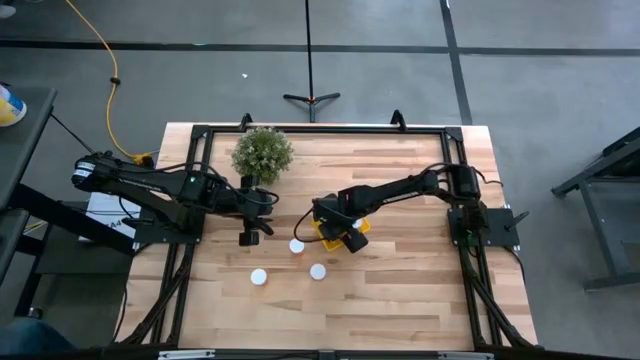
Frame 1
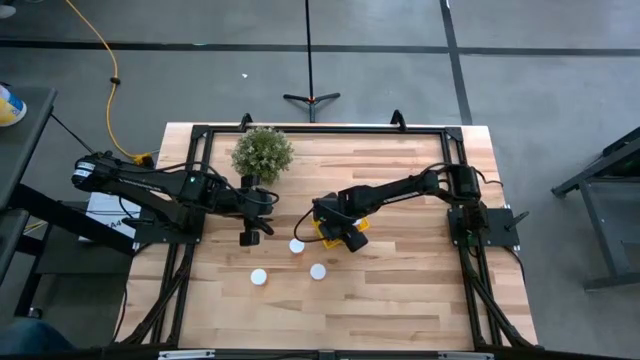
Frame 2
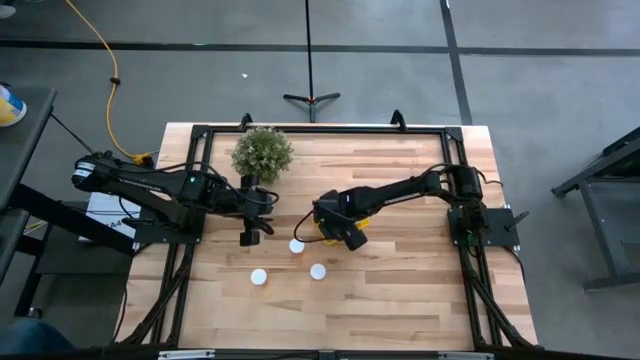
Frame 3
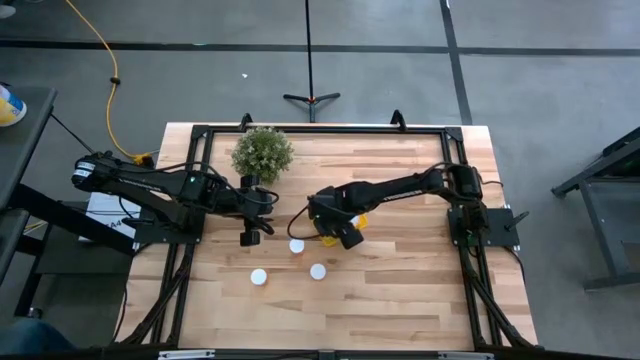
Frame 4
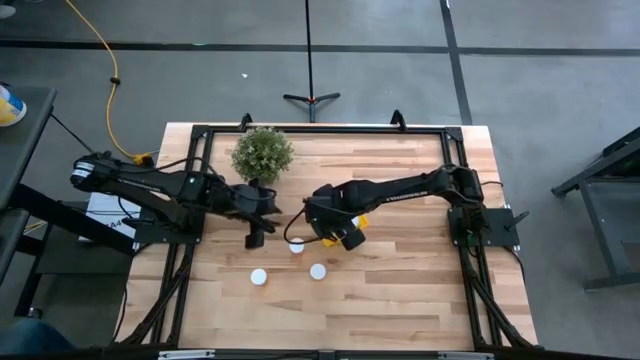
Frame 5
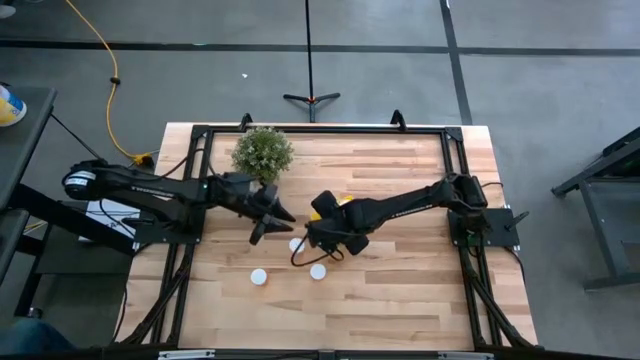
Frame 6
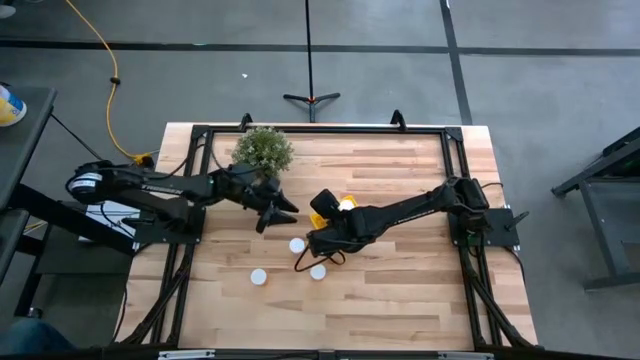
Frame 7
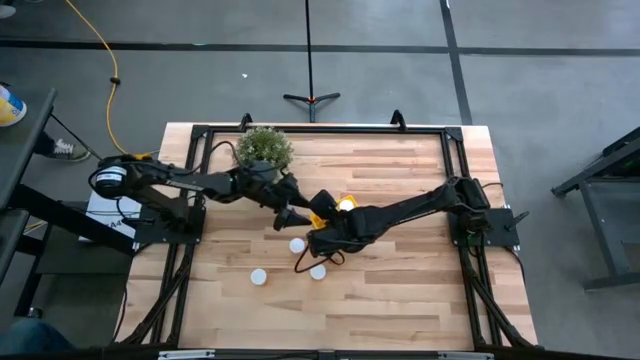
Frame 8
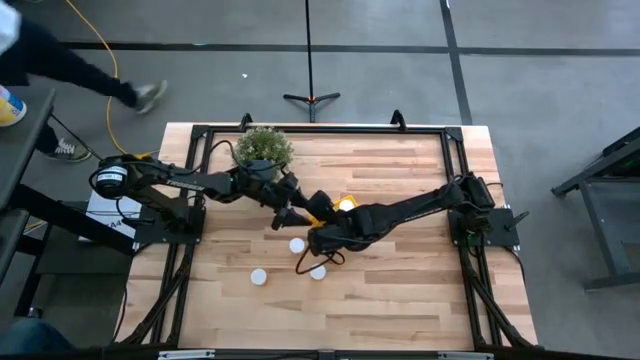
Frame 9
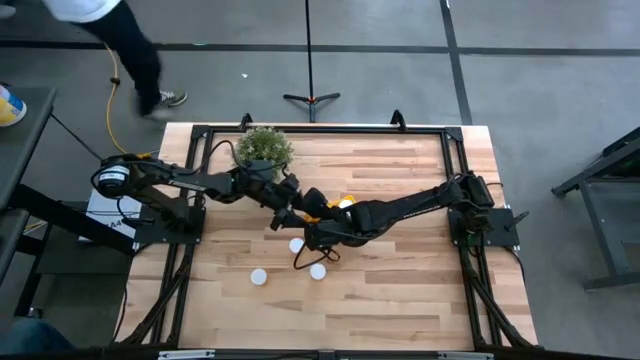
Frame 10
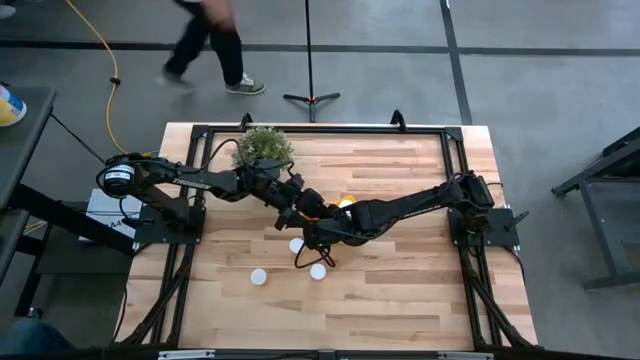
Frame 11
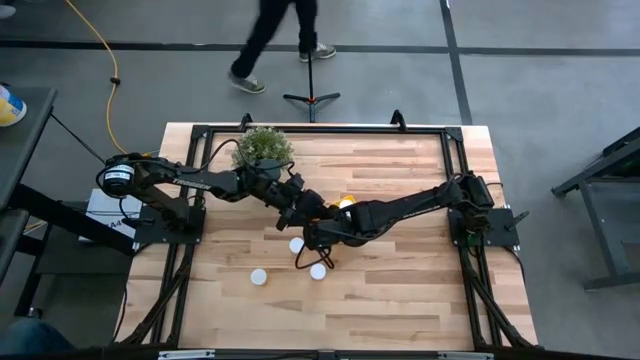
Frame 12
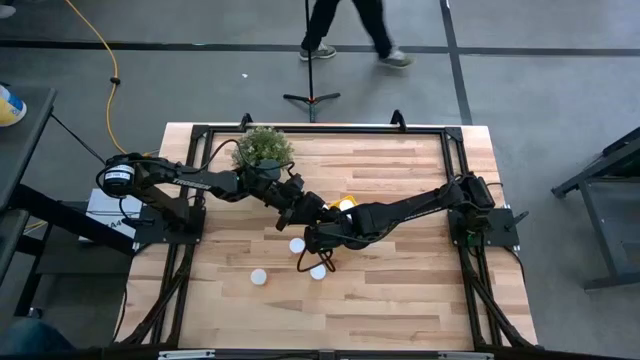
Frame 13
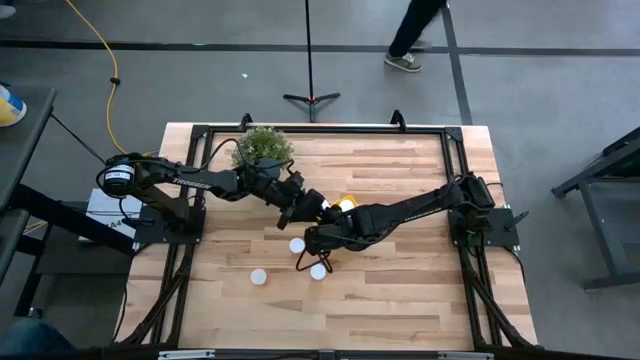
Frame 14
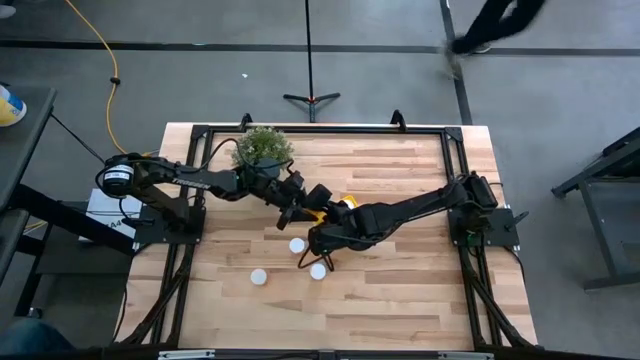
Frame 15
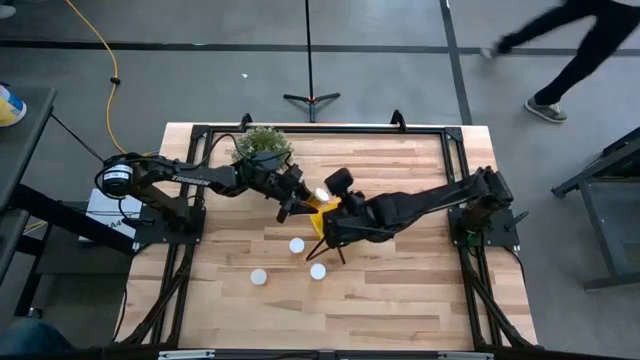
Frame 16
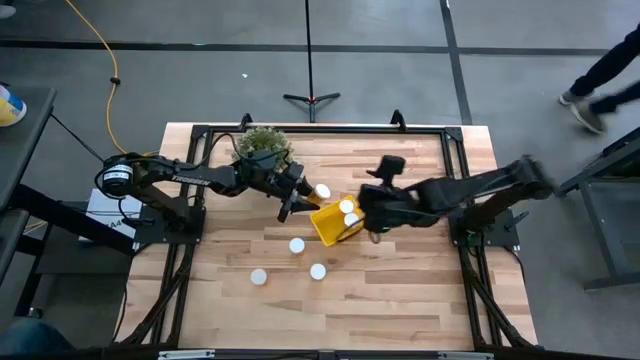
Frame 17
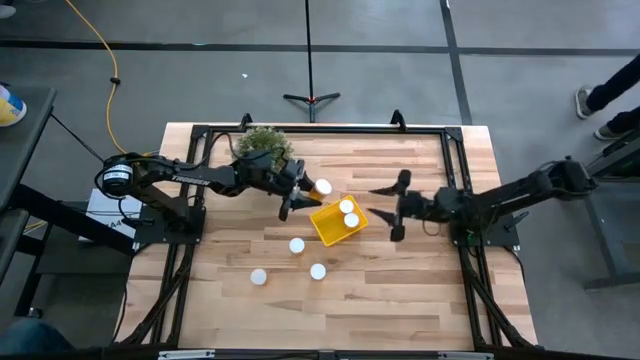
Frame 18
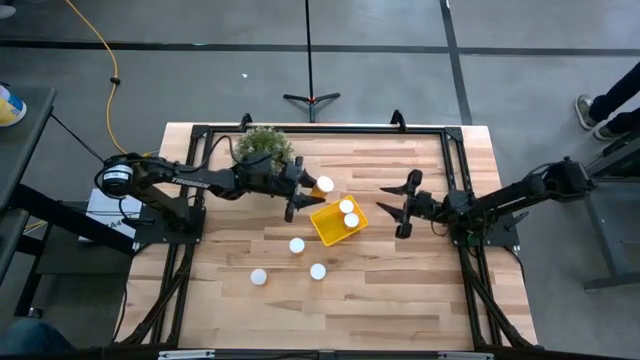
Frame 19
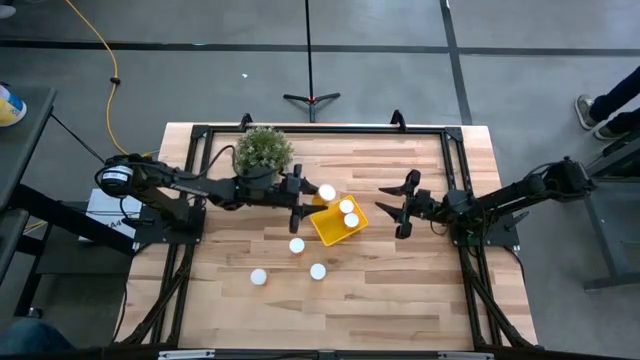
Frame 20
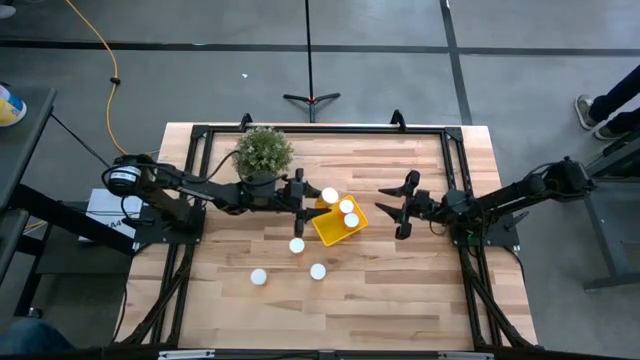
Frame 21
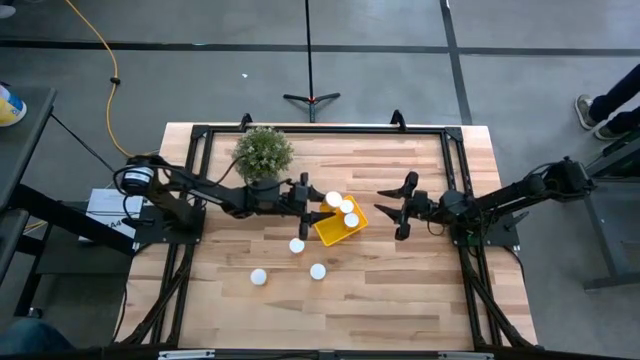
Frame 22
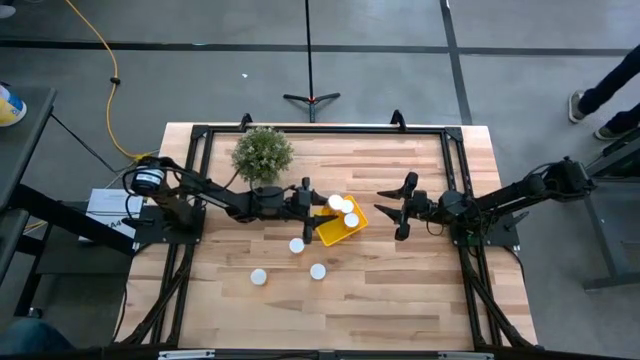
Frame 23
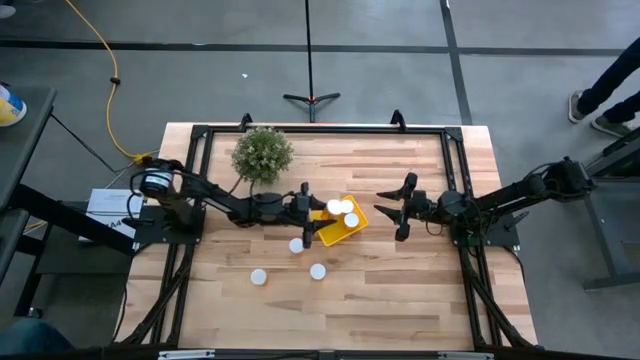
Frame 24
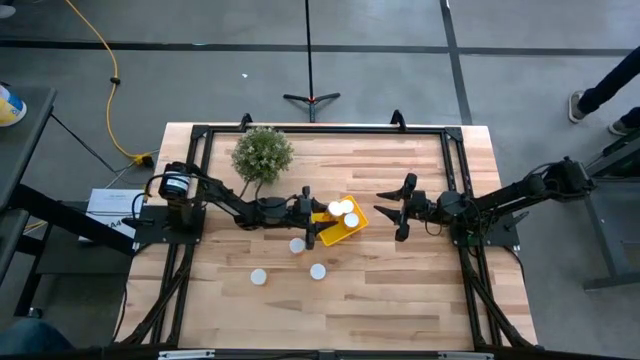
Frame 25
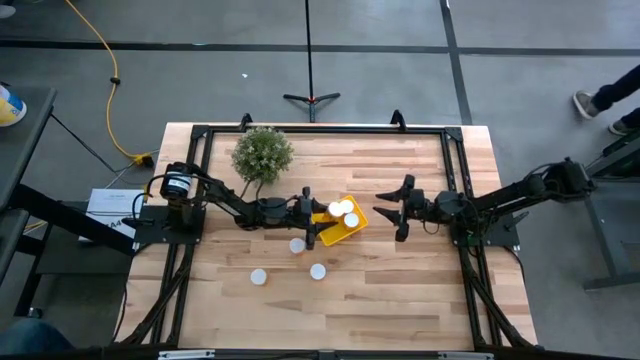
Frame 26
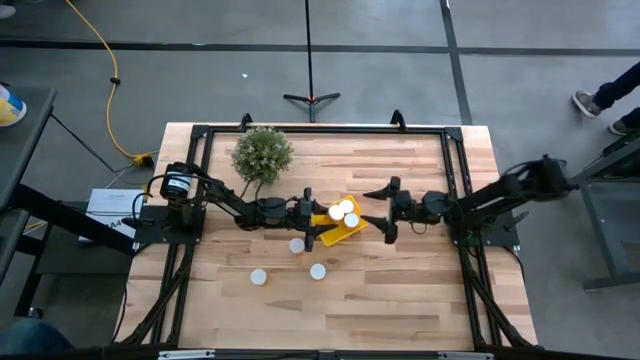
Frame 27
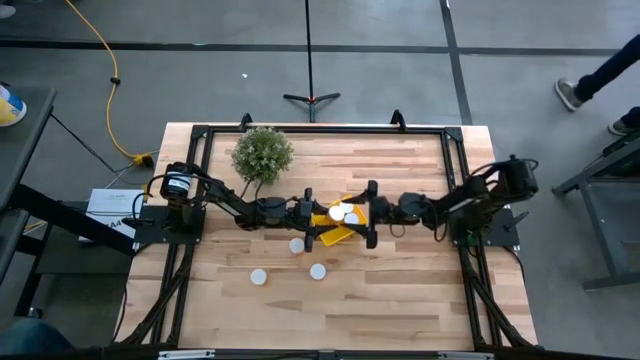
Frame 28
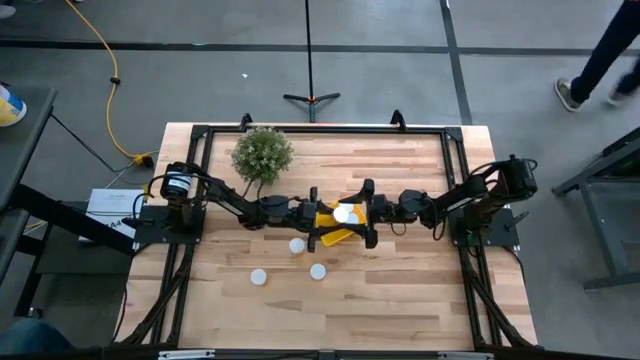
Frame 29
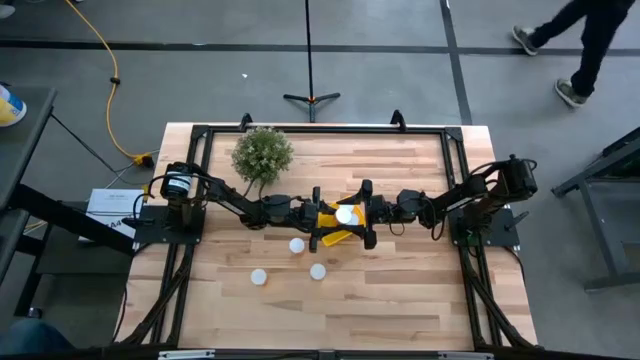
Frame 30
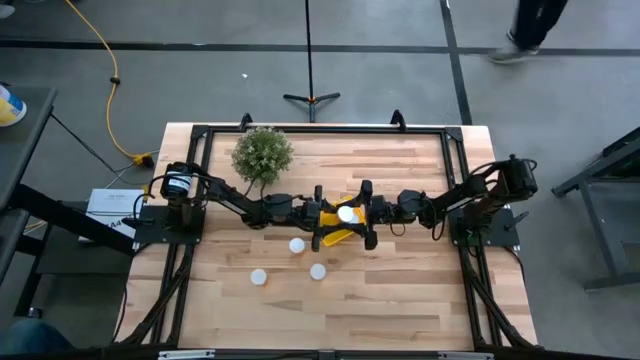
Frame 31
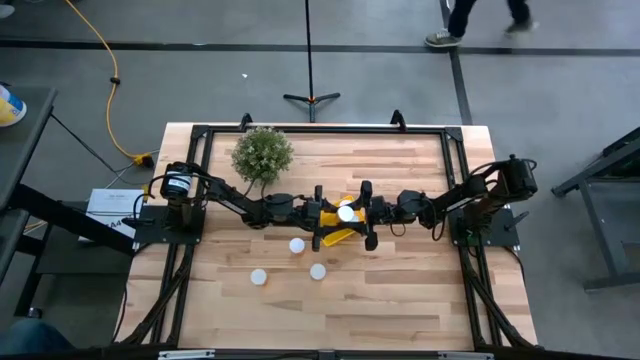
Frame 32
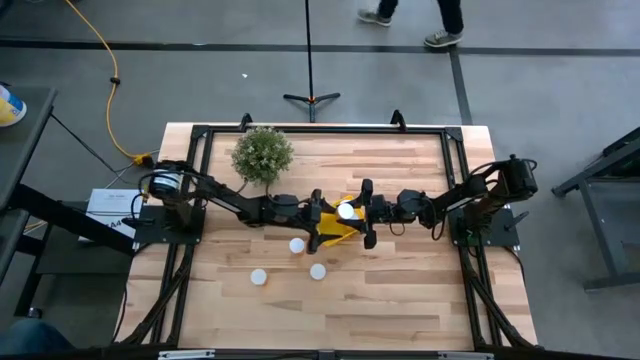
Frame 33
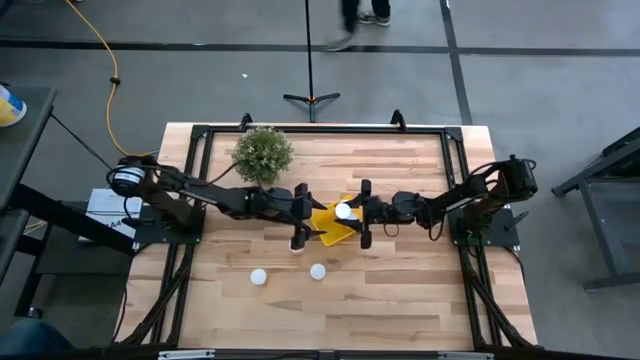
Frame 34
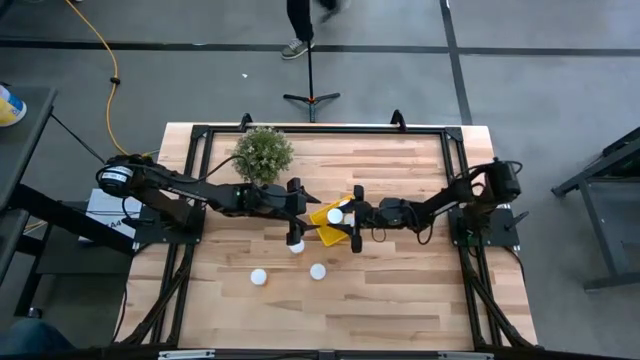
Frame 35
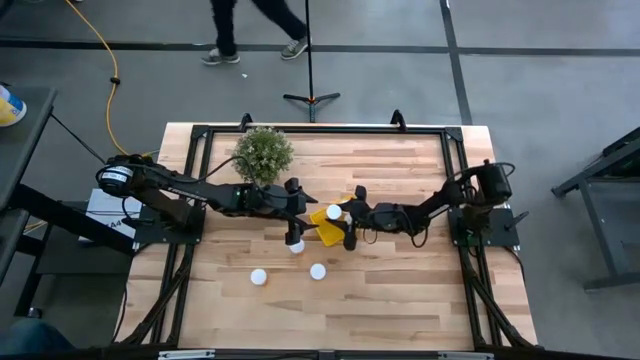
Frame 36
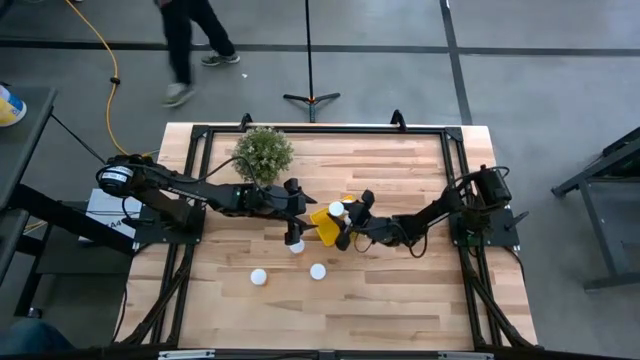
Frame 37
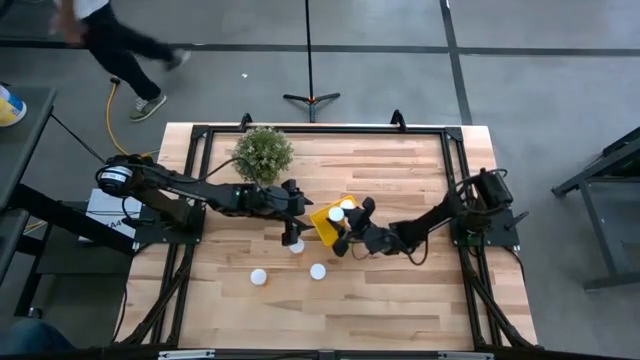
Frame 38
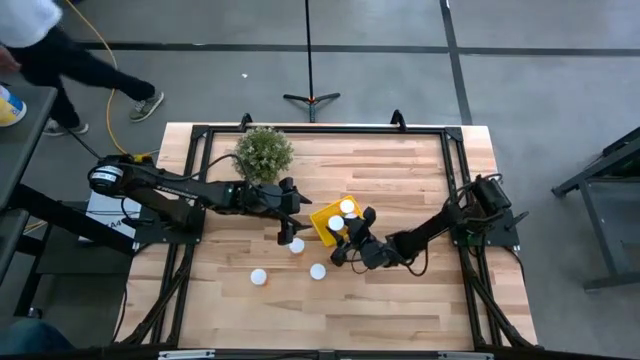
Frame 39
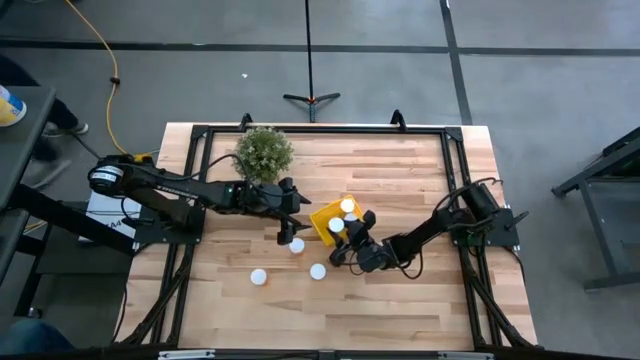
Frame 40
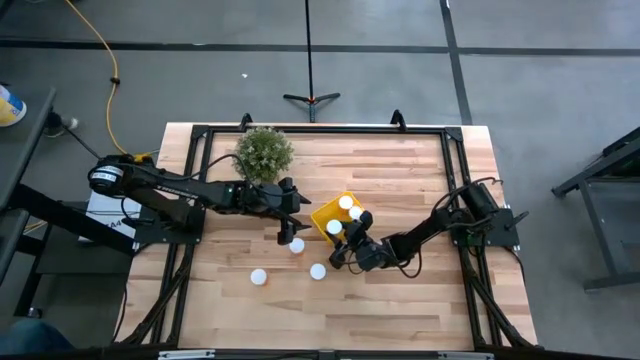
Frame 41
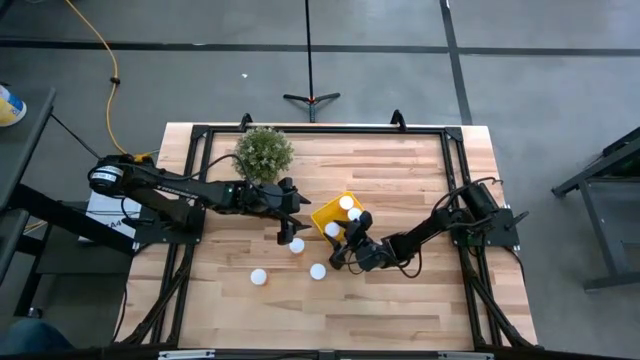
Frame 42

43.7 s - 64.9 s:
Task: Pick and place pill bottles into a basket
Adjust the orange pill bottles
